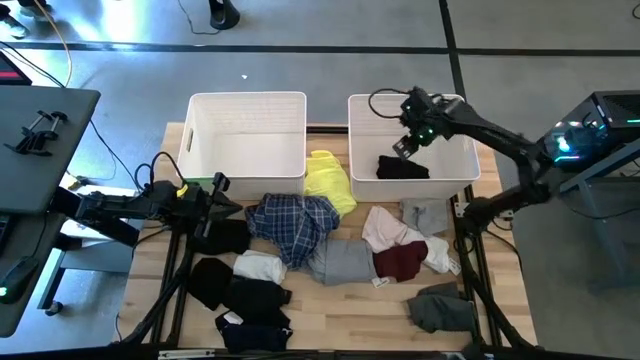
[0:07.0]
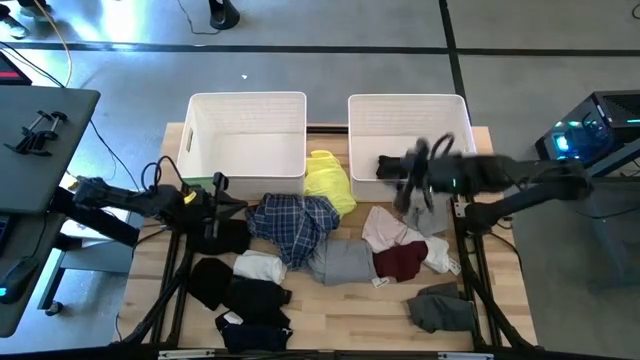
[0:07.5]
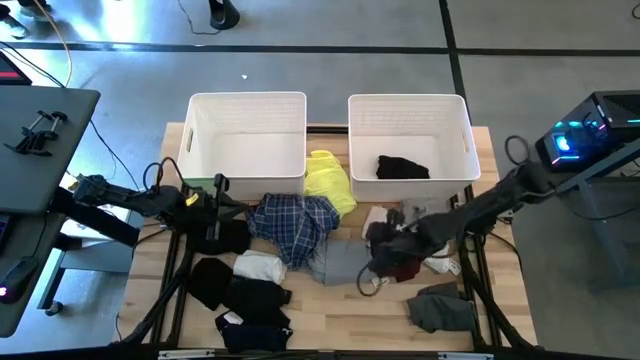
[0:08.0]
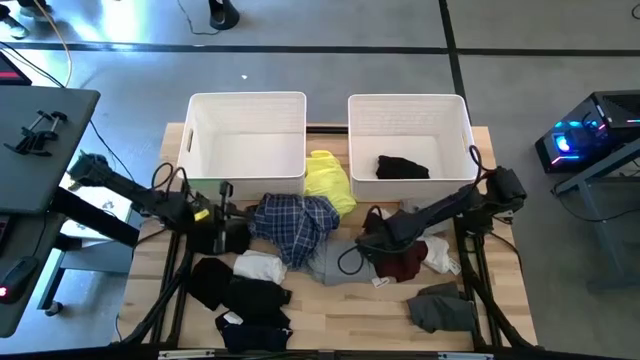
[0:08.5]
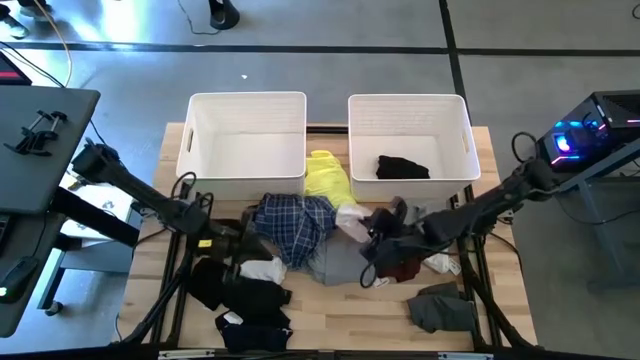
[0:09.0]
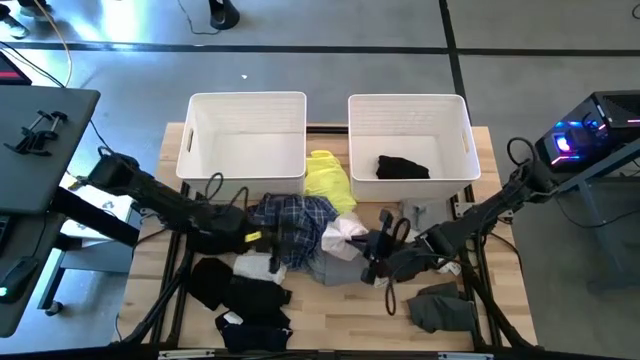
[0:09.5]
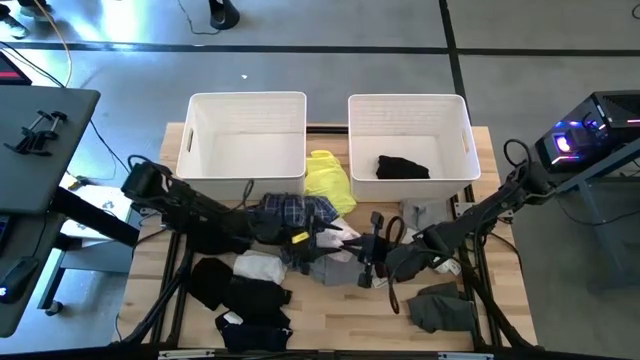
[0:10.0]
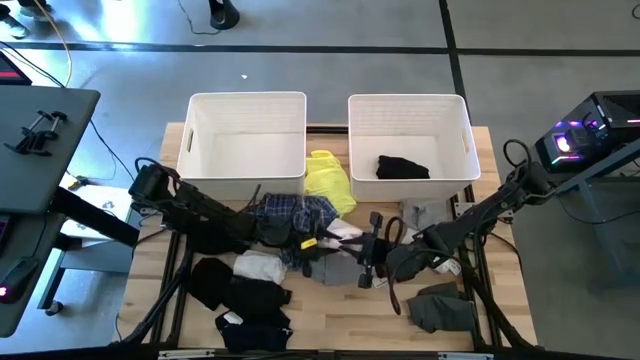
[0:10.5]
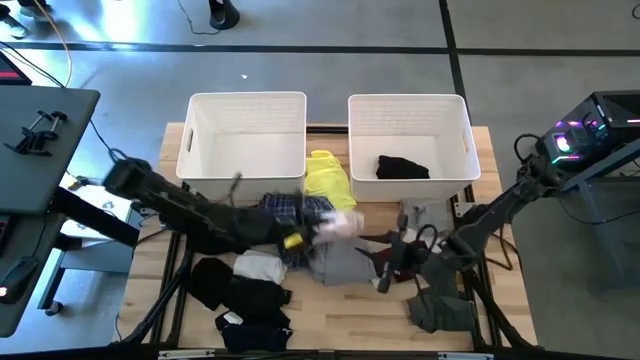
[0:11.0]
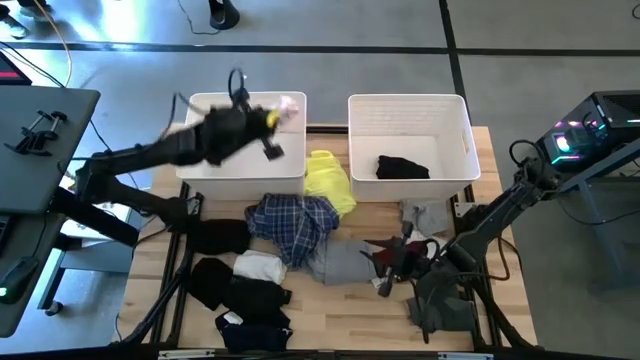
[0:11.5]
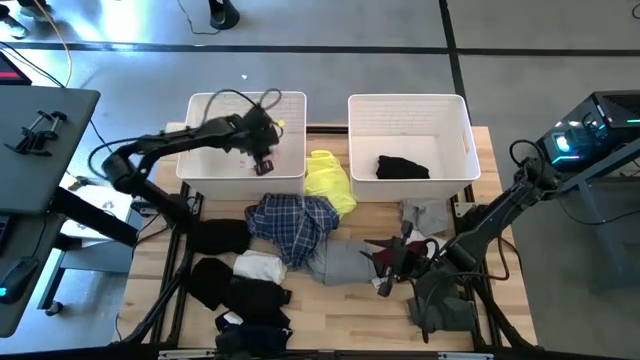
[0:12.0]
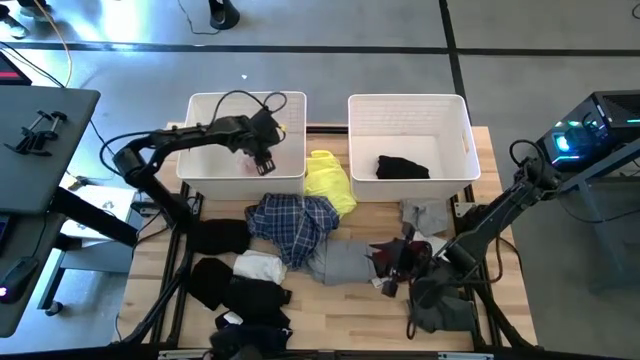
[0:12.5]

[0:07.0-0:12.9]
Task: Sort clothes
Put the white shirt into the left white laundry bin

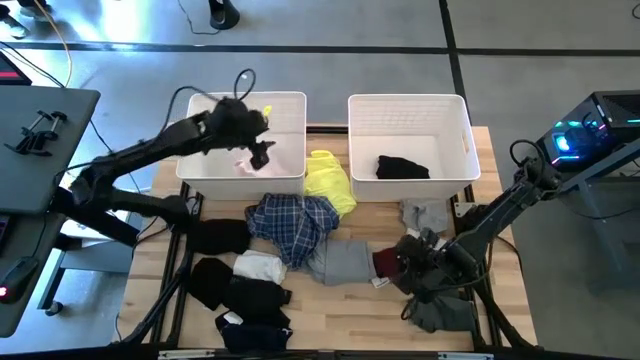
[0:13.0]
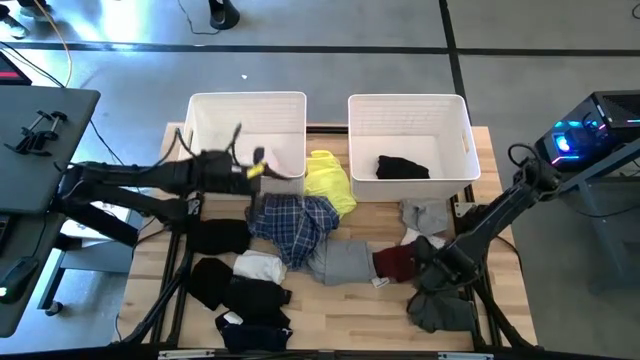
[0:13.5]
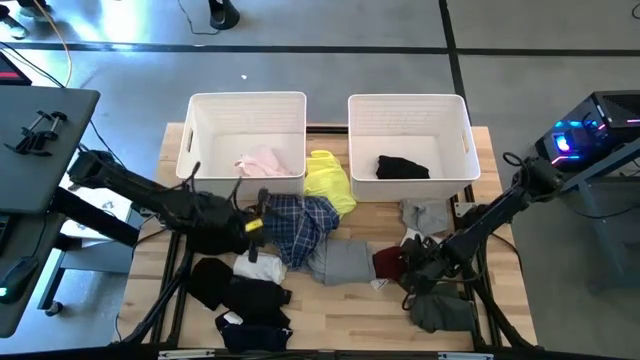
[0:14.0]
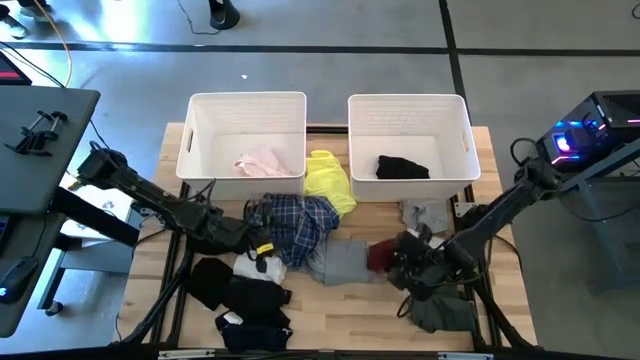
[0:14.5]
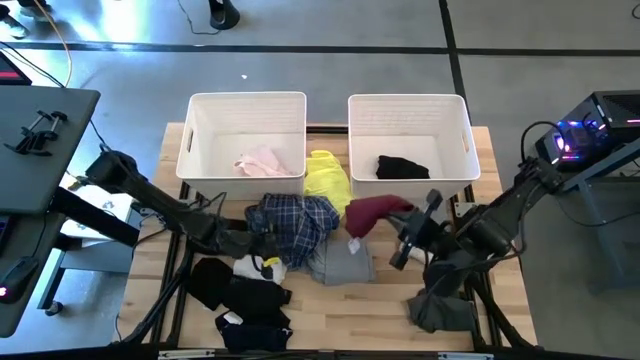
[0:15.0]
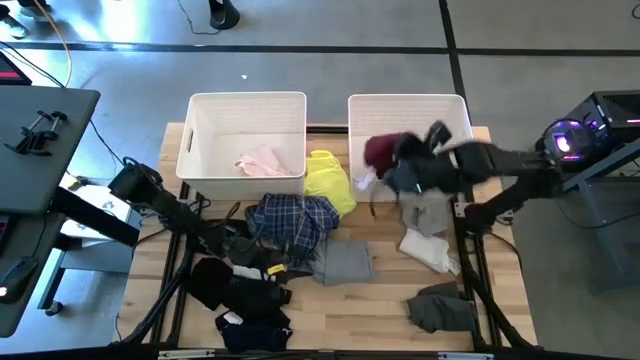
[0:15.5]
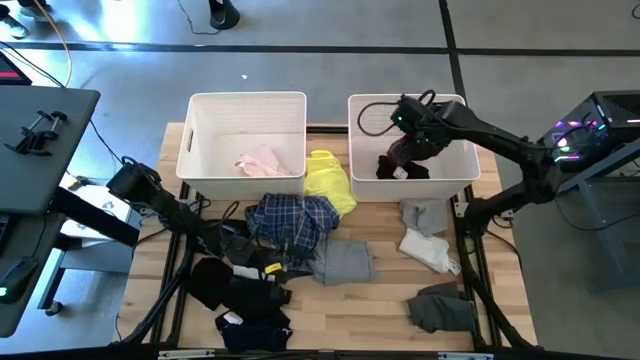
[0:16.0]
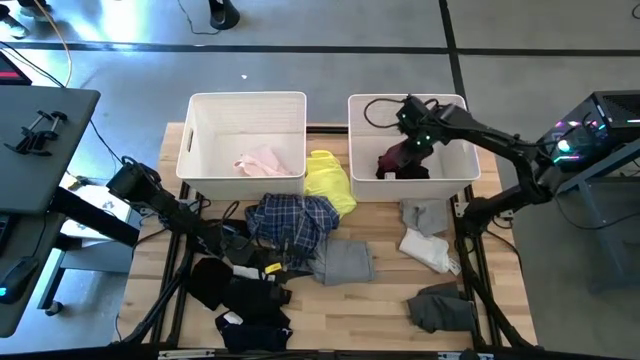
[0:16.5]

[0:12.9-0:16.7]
Put the red shorts into the right white laundry bin

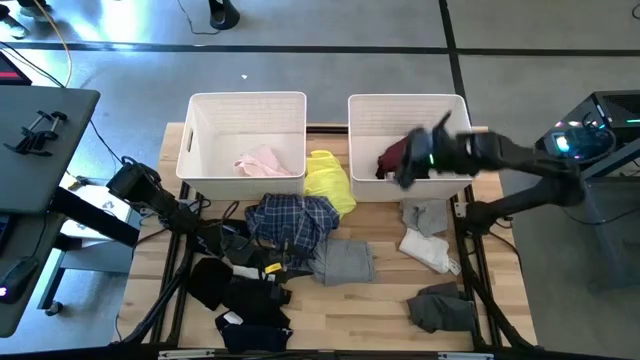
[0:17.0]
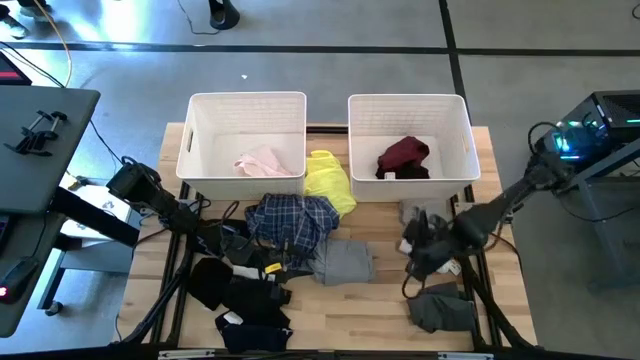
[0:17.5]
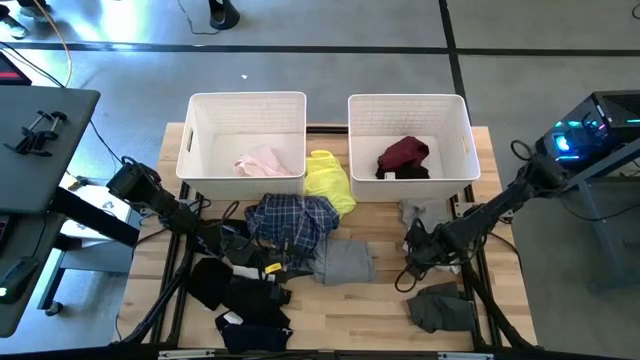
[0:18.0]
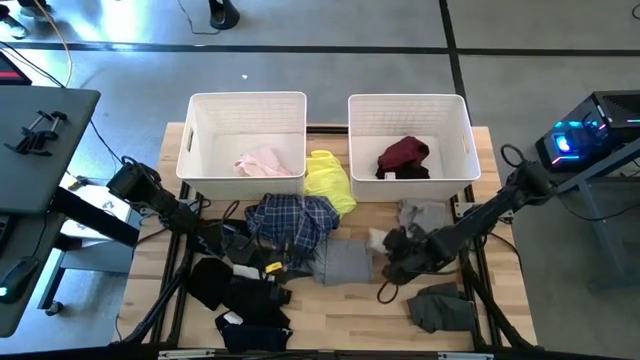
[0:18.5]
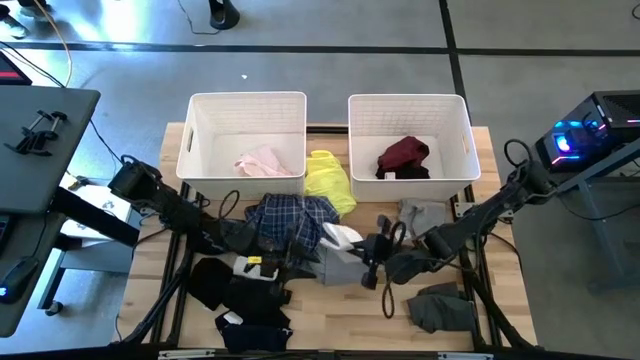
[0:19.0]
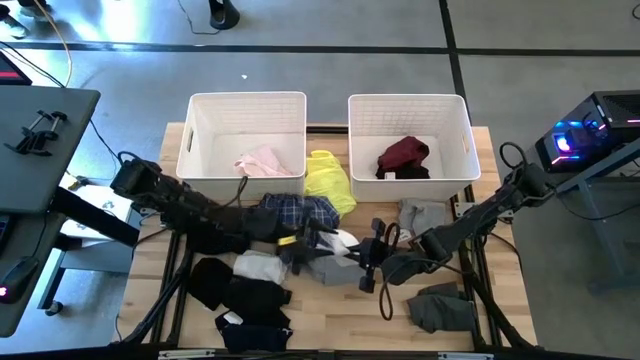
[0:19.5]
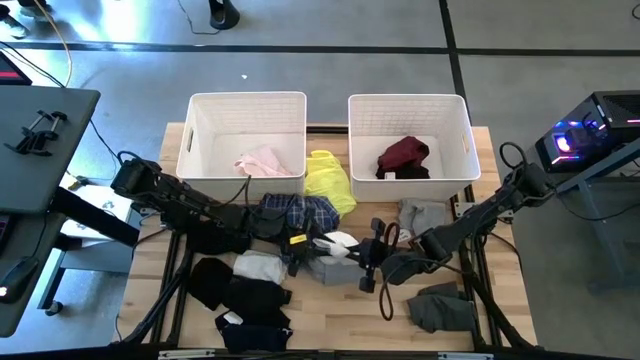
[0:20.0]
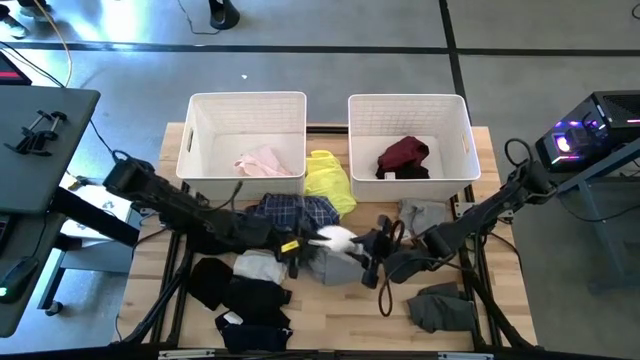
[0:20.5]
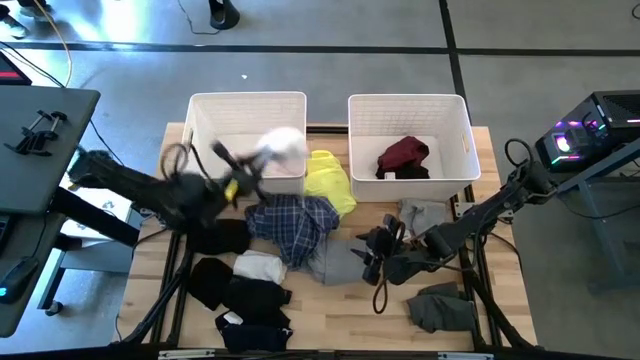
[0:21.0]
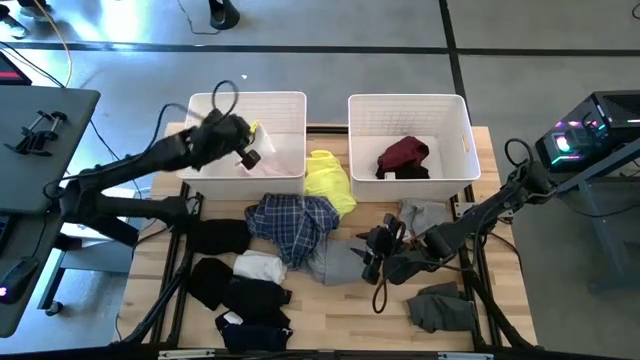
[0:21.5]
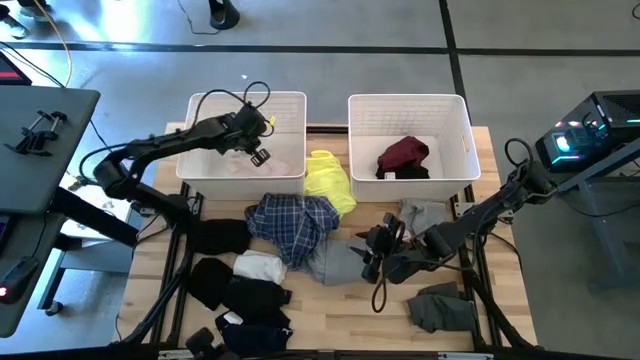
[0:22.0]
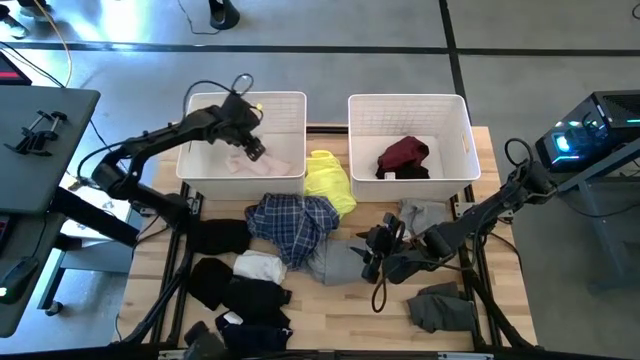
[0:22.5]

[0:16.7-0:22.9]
Put the white shirt into the left white laundry bin

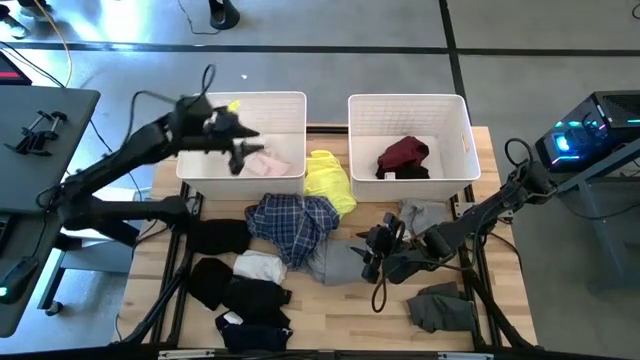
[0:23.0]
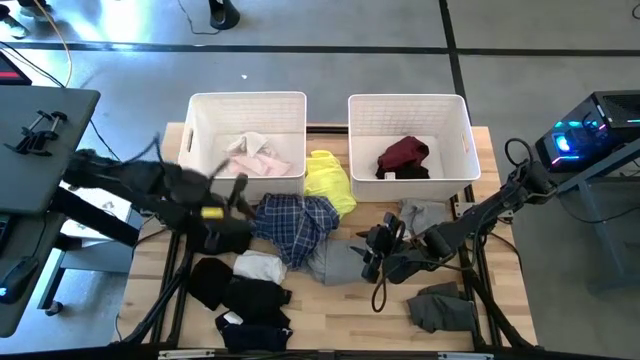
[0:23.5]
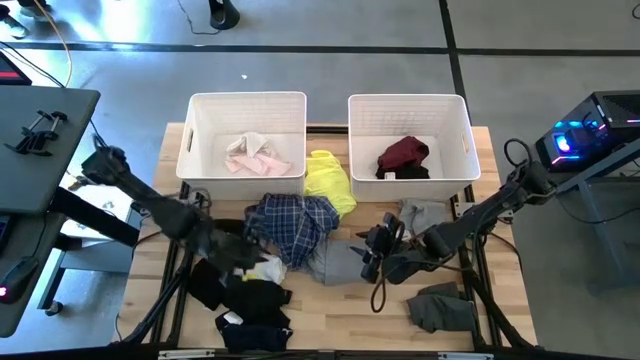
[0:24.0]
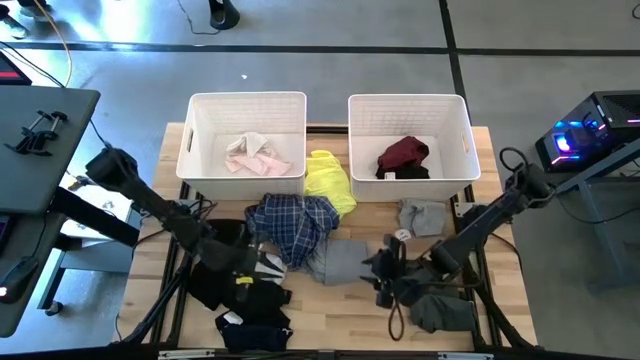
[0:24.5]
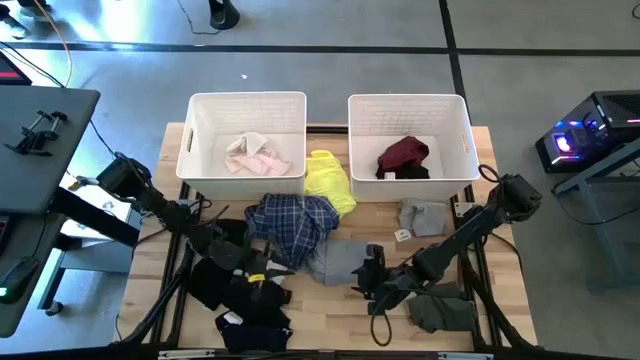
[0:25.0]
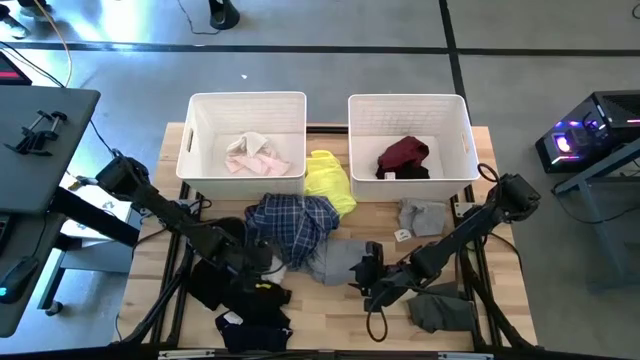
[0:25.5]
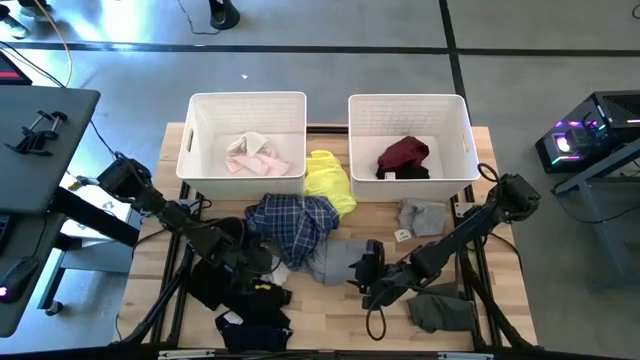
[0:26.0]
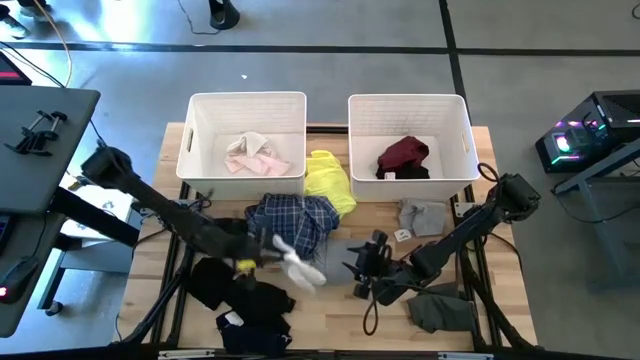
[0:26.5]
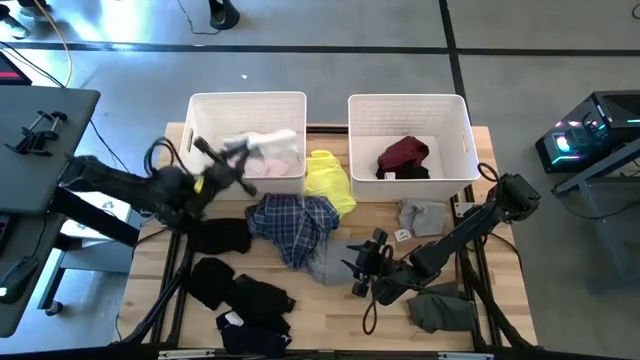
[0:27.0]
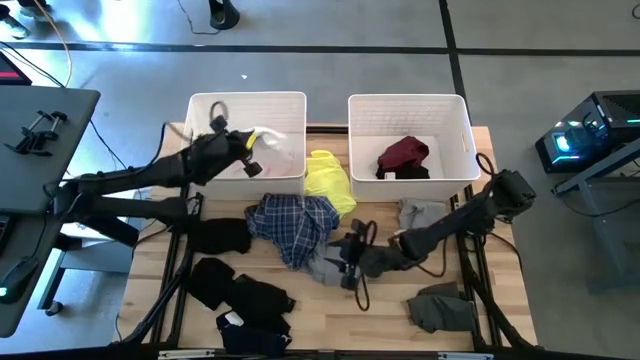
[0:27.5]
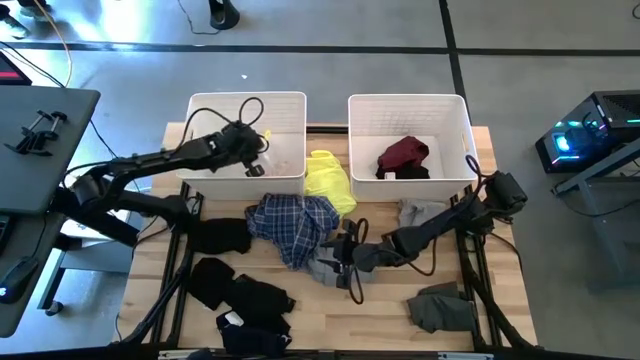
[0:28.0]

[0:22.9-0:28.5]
Put the white shirt into the left white laundry bin
